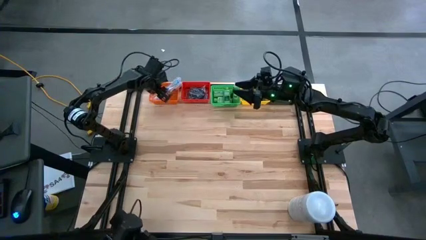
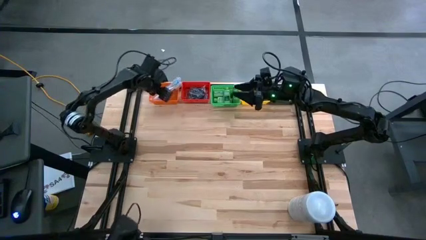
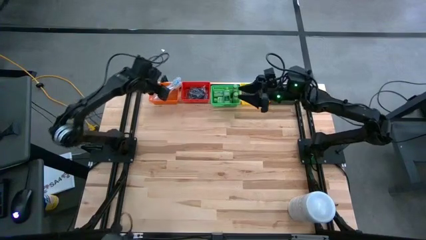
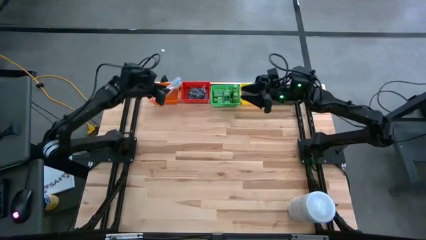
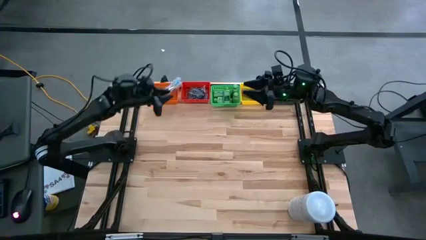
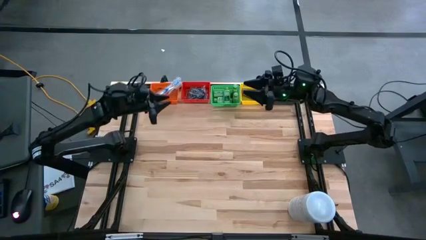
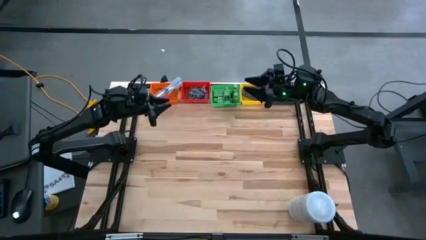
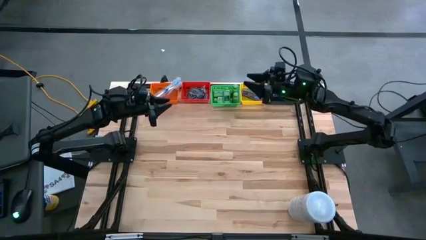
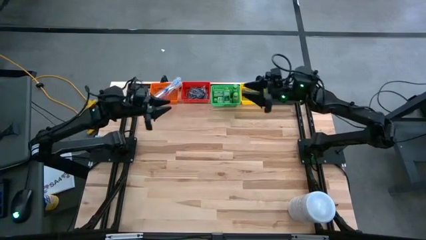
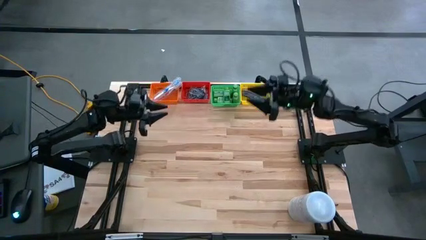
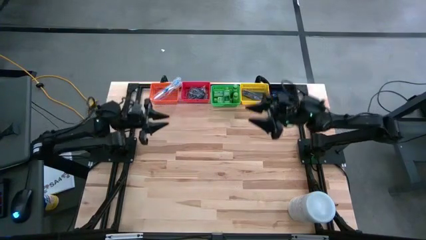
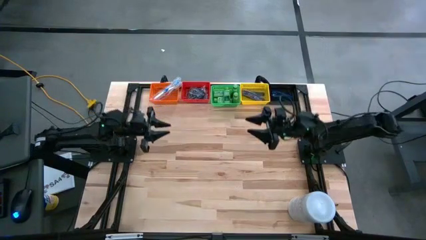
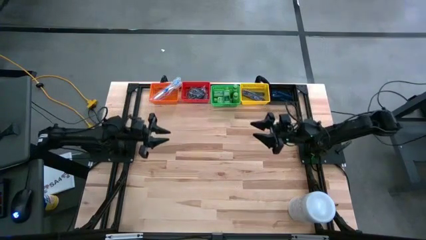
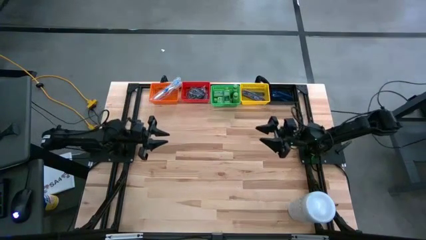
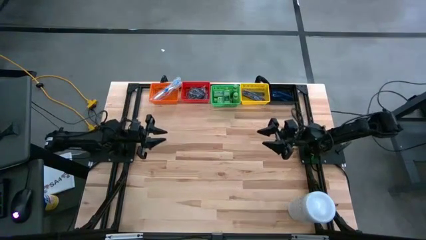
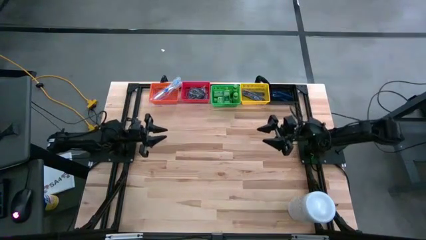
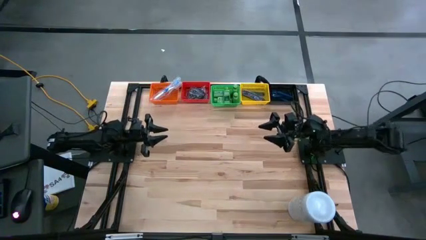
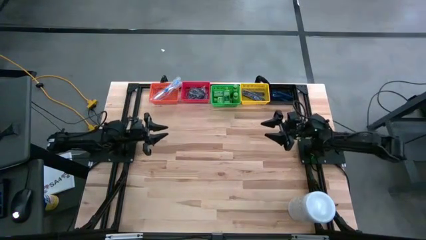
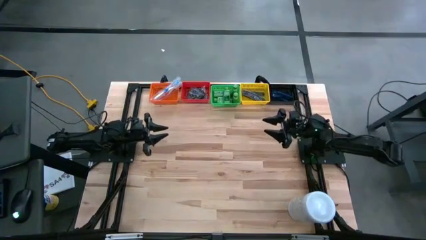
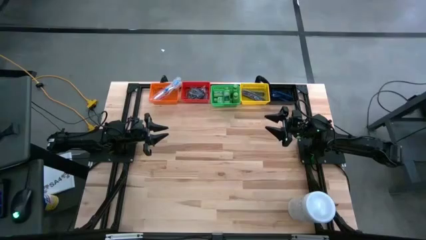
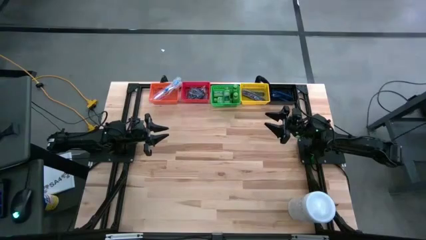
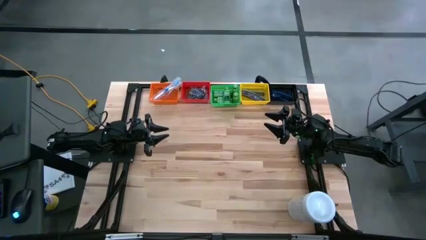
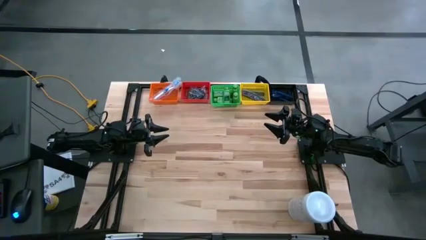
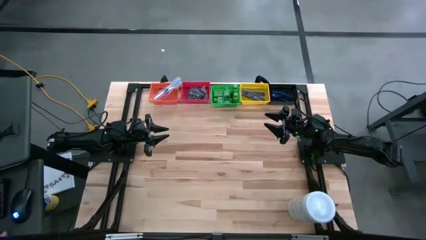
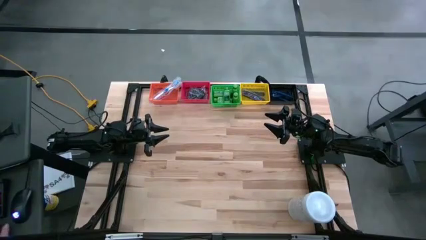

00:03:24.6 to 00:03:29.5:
Task: Pick & Place Travel size toiletries
Return to Home Position

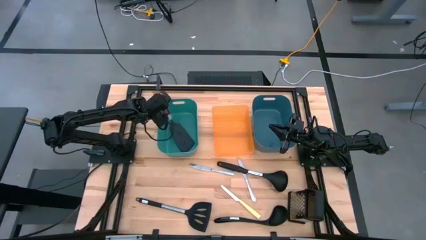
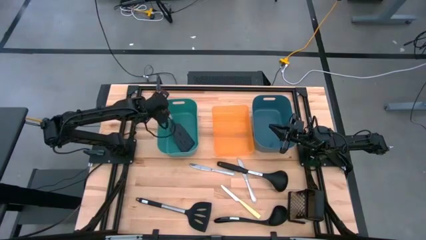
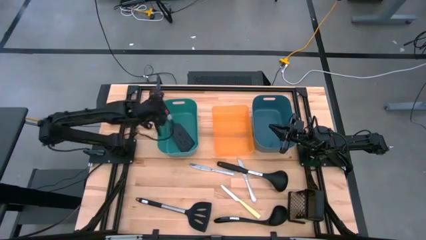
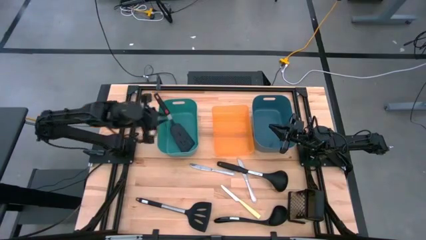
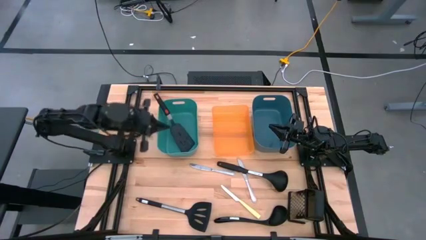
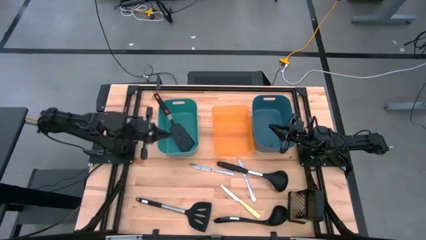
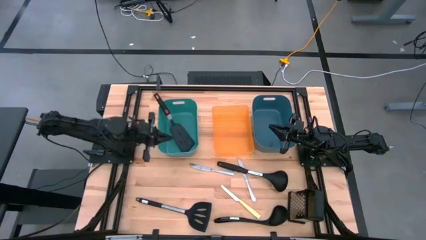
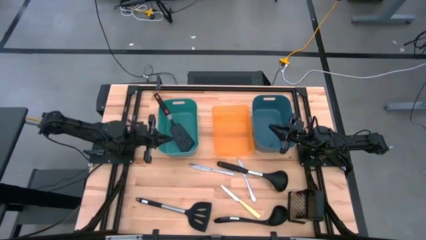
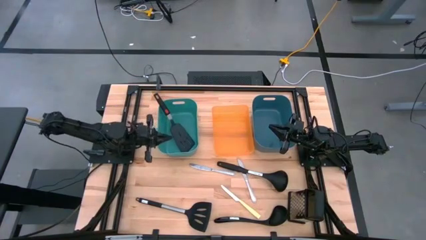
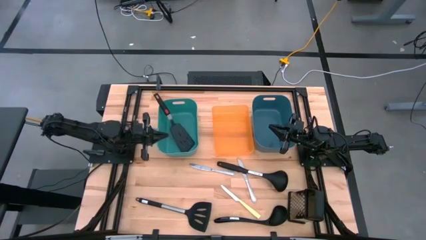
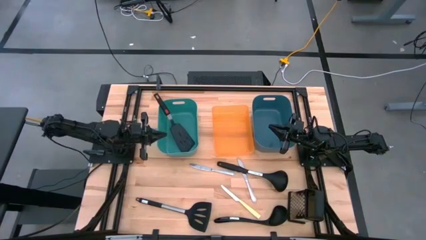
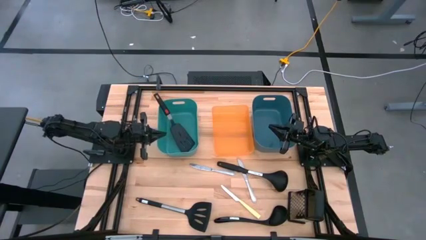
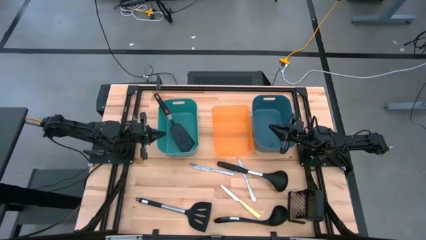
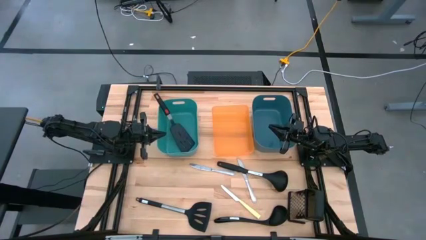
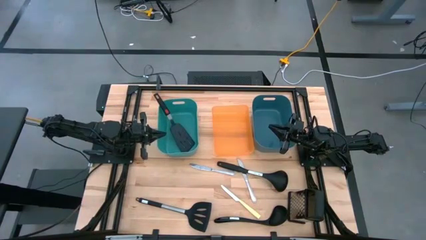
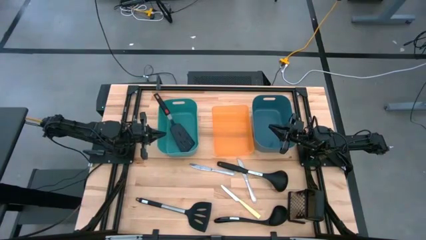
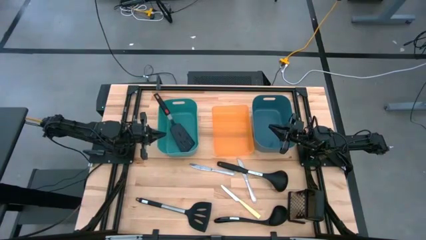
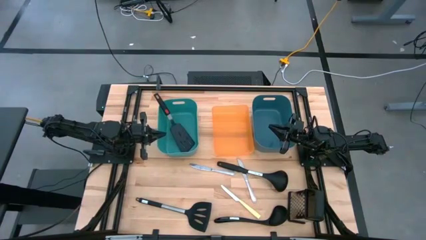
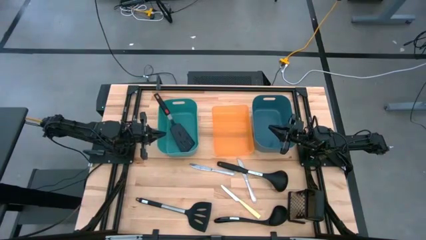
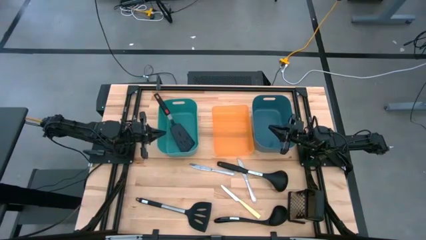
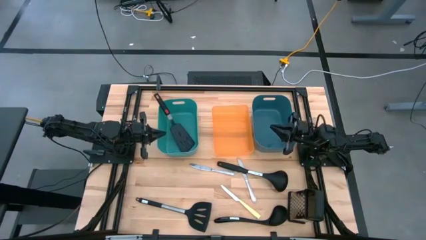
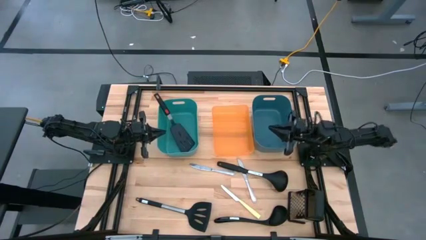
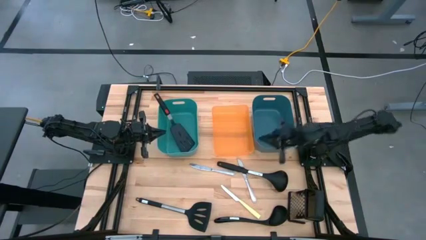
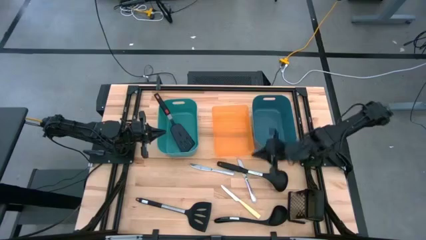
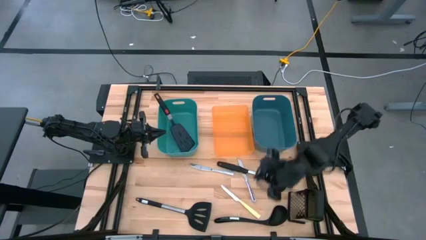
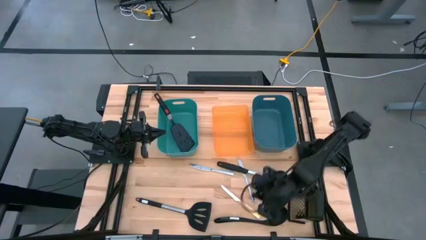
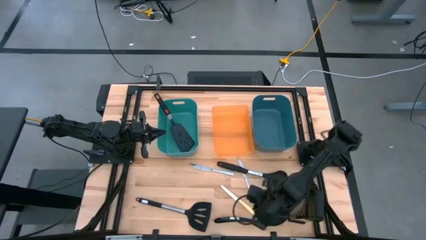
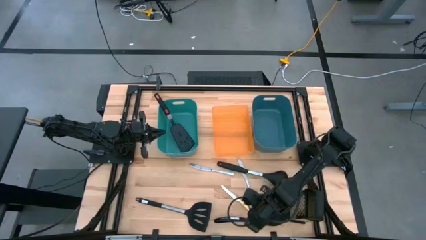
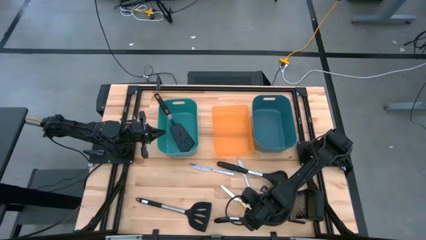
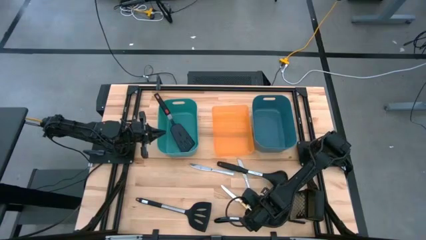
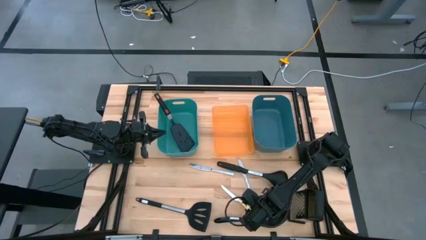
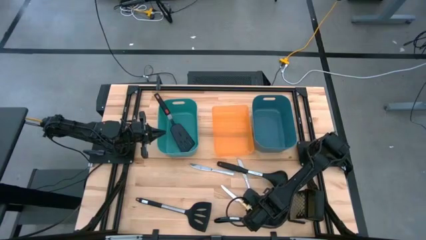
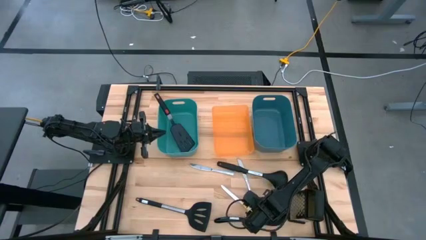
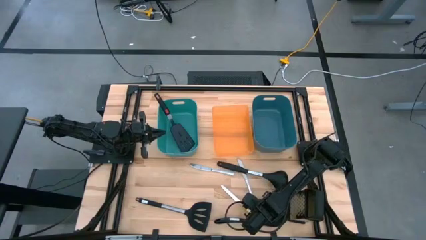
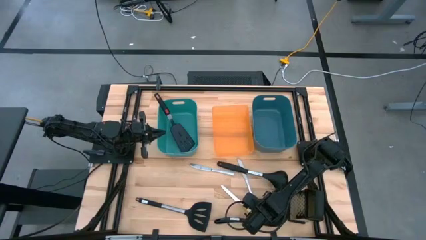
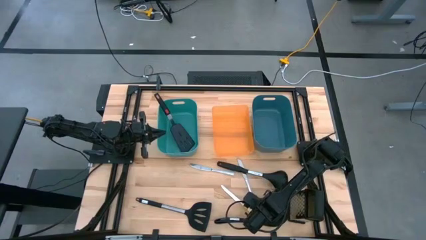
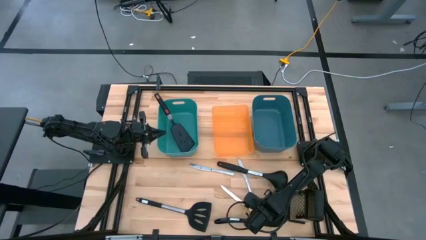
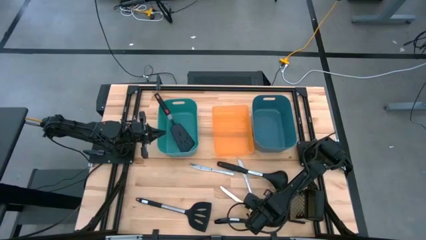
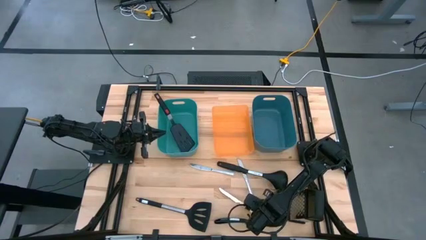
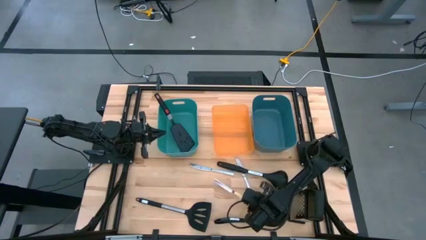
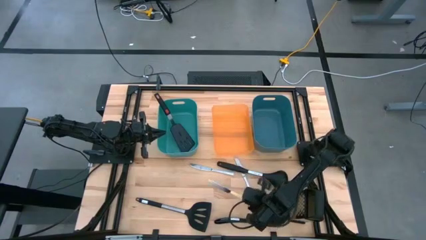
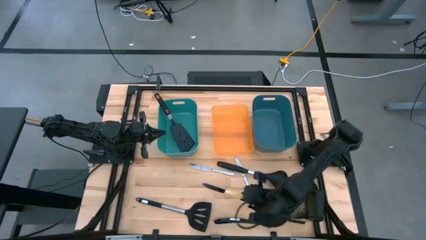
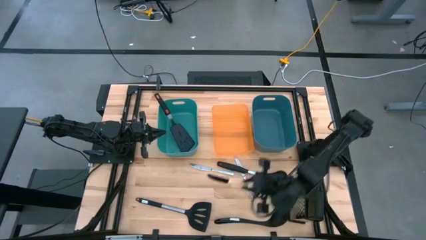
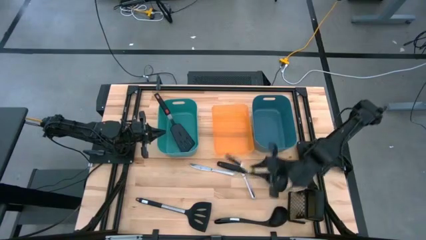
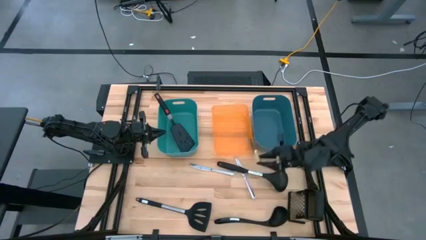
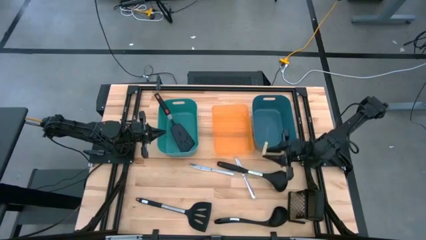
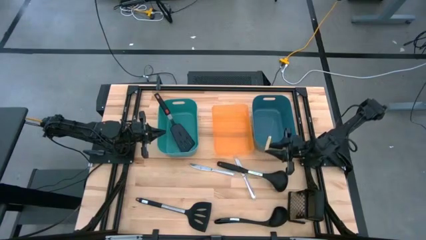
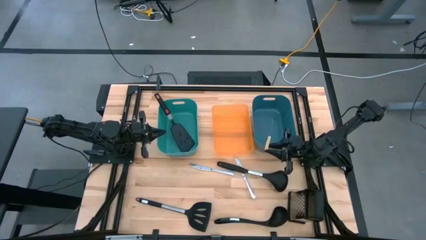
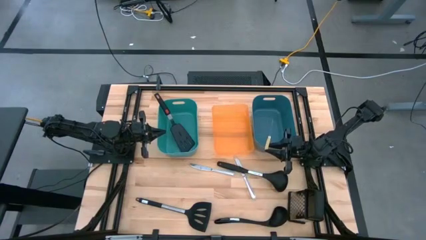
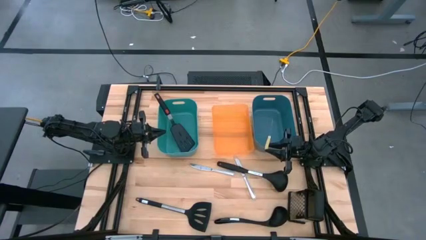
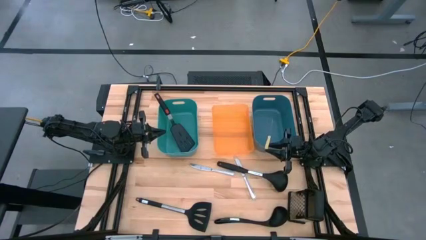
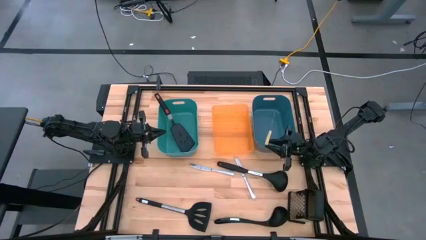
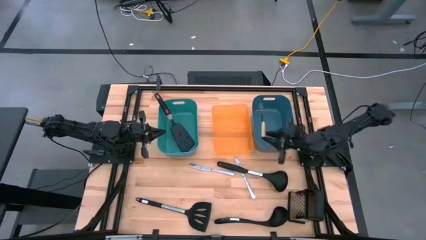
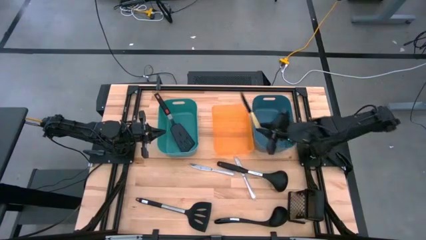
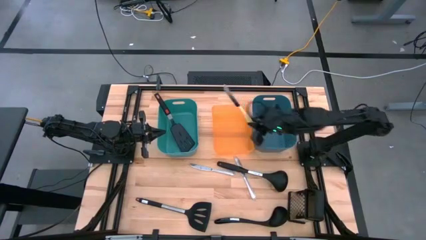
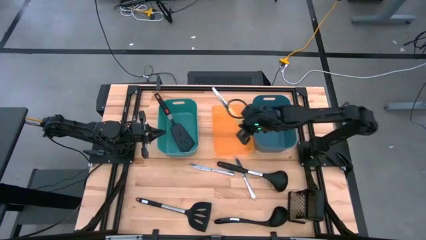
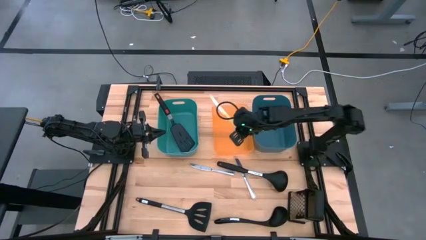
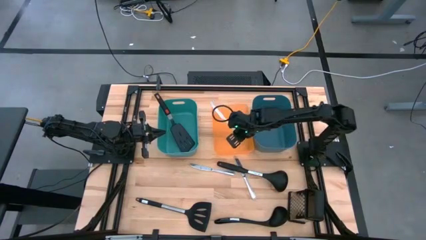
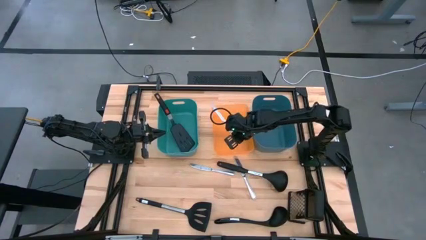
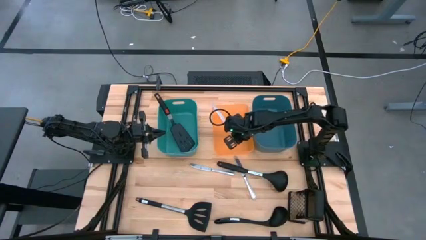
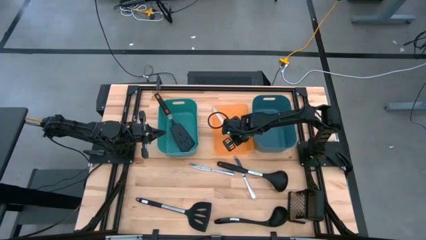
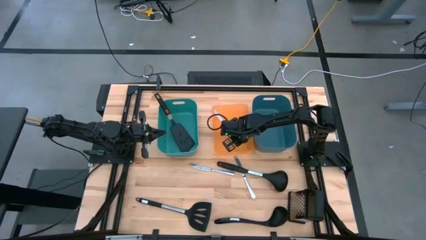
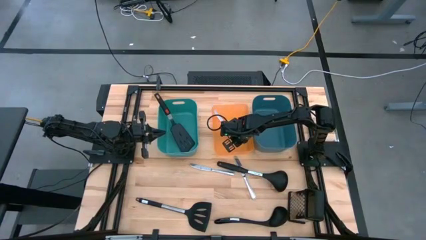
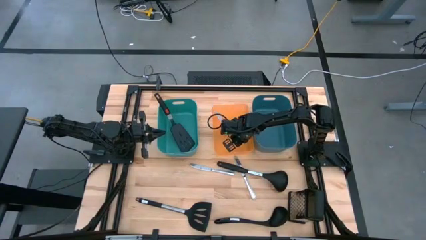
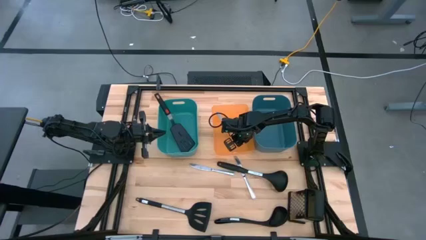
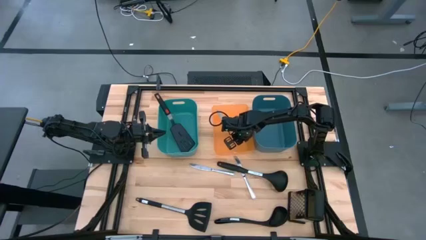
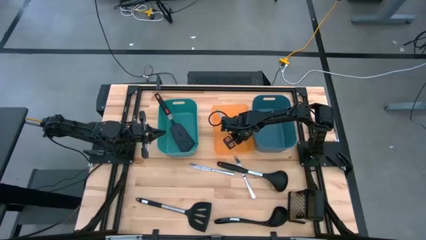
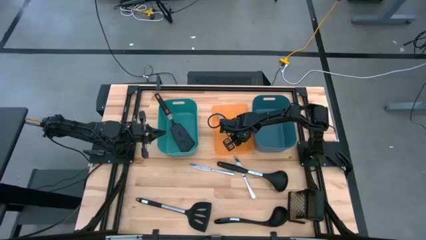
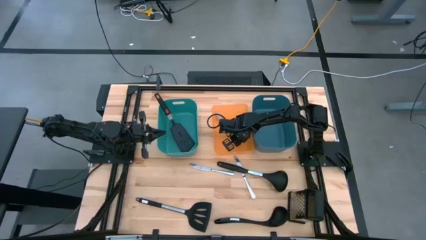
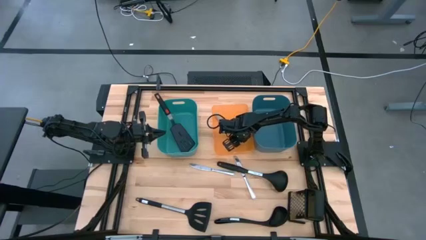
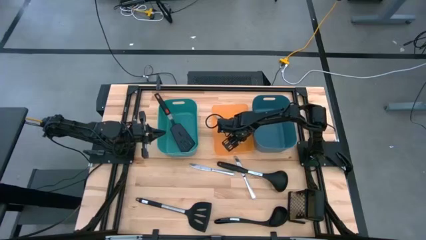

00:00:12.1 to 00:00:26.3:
Task: Pick & Place Kitchen Items
Put the yellow knife into the orange bin
